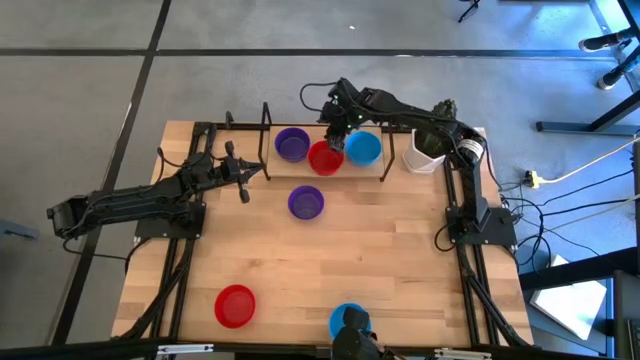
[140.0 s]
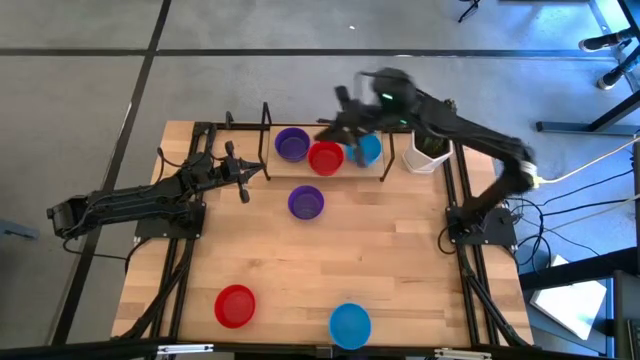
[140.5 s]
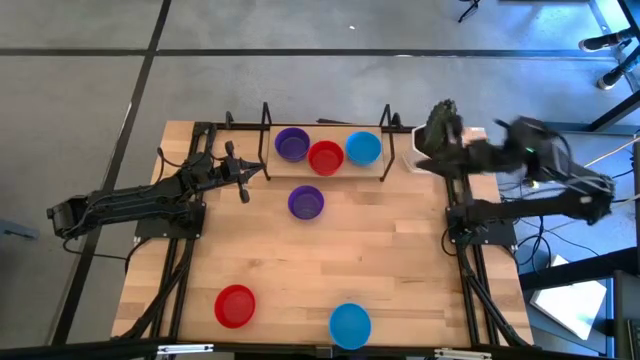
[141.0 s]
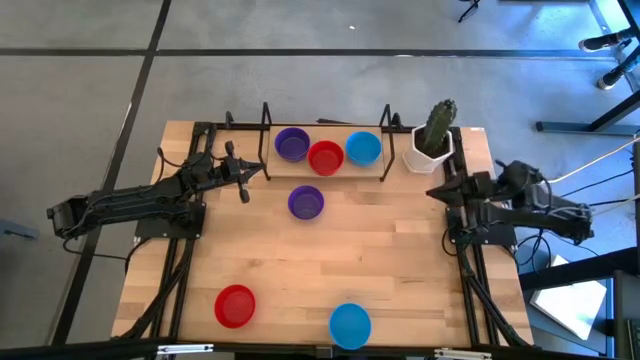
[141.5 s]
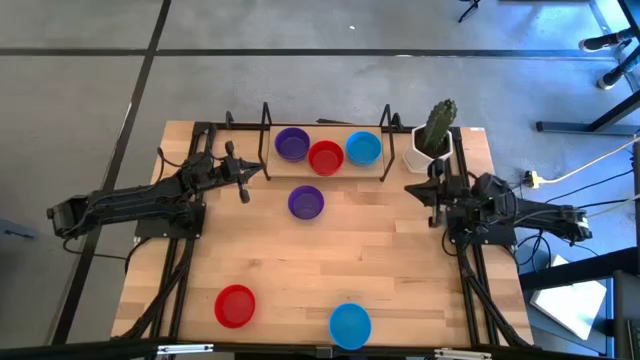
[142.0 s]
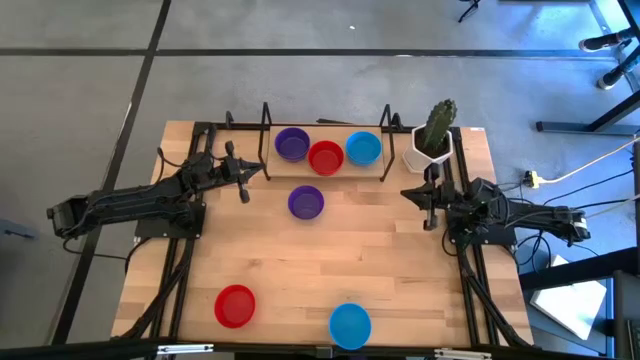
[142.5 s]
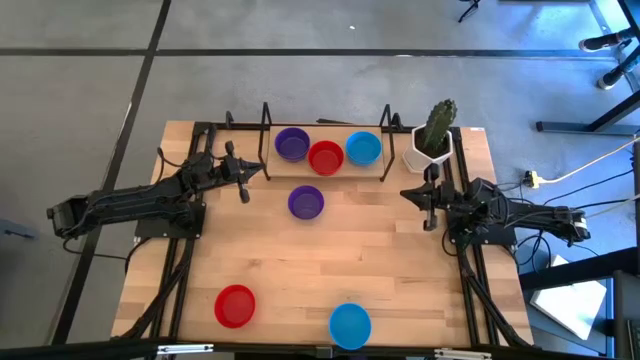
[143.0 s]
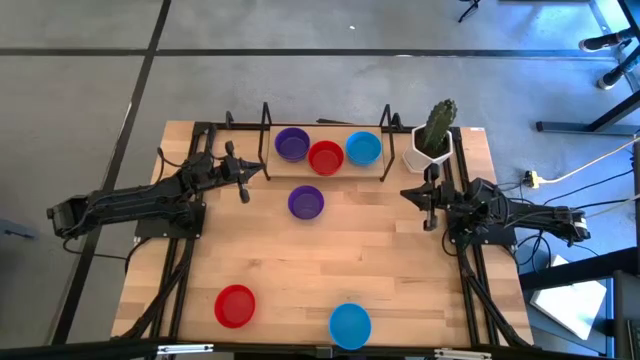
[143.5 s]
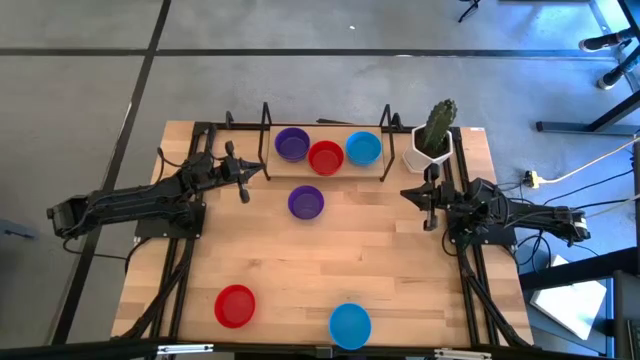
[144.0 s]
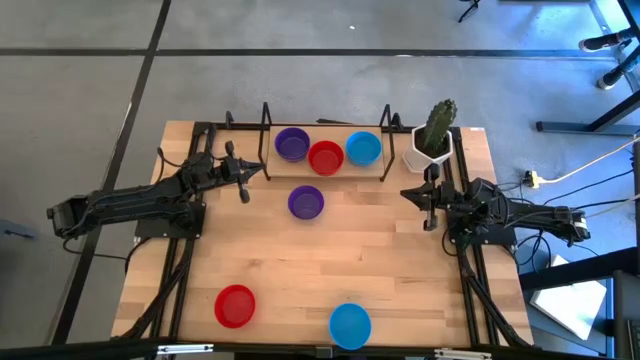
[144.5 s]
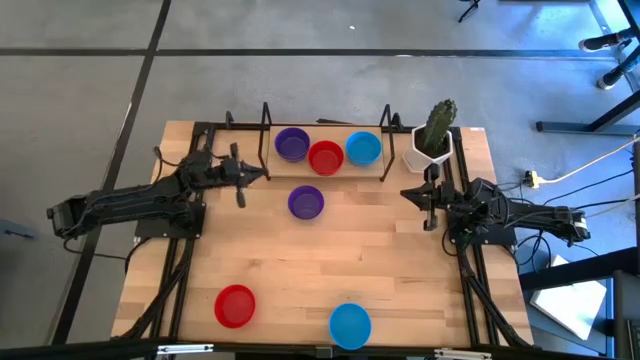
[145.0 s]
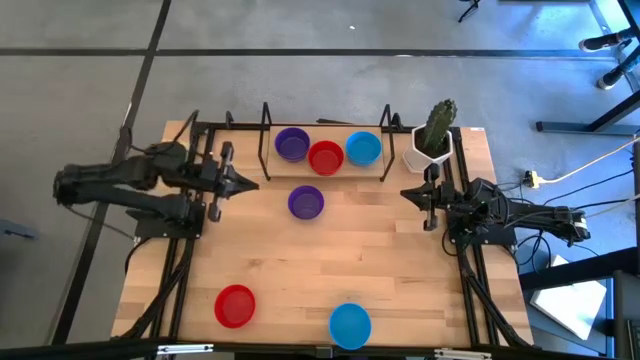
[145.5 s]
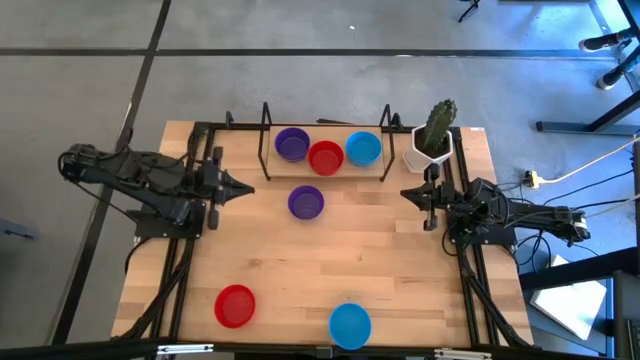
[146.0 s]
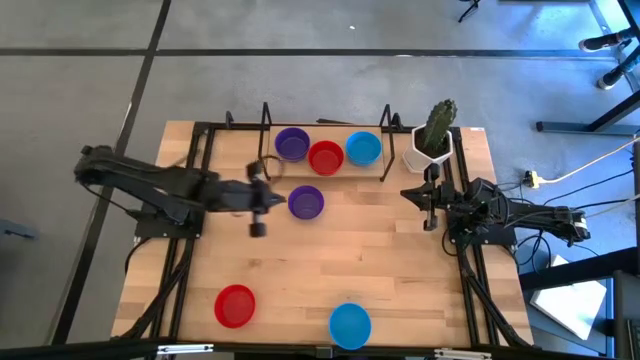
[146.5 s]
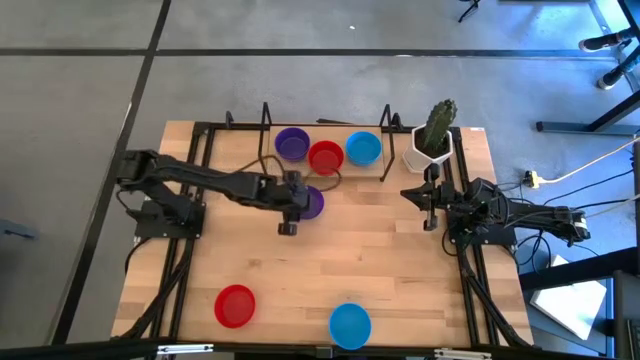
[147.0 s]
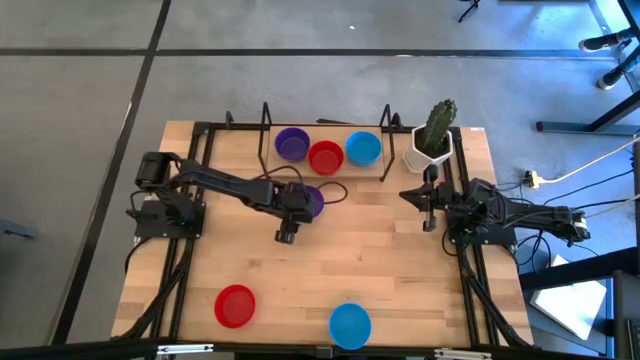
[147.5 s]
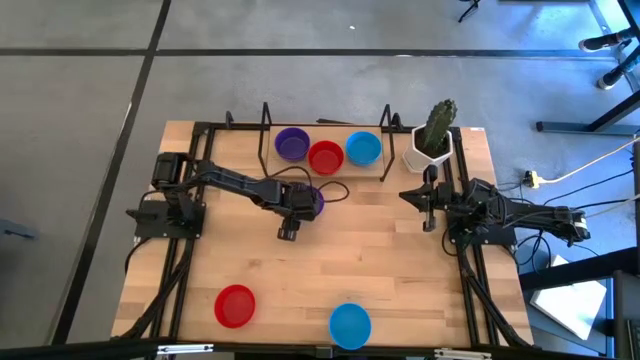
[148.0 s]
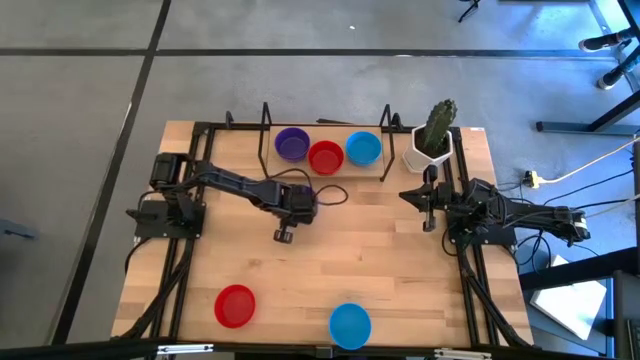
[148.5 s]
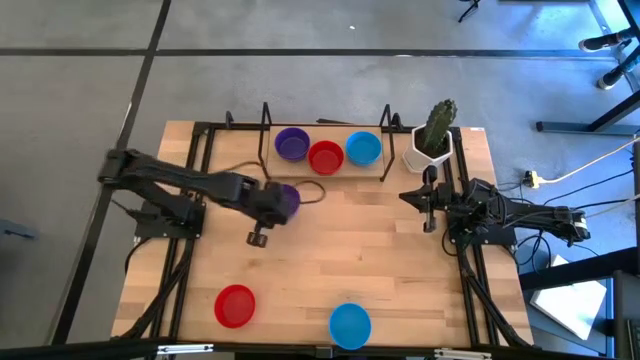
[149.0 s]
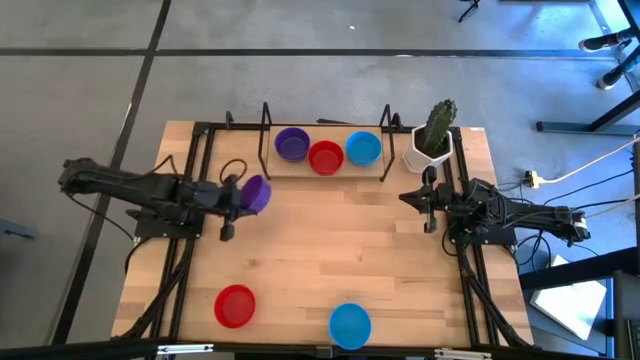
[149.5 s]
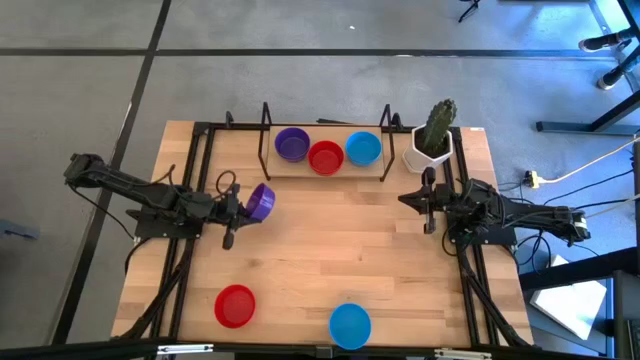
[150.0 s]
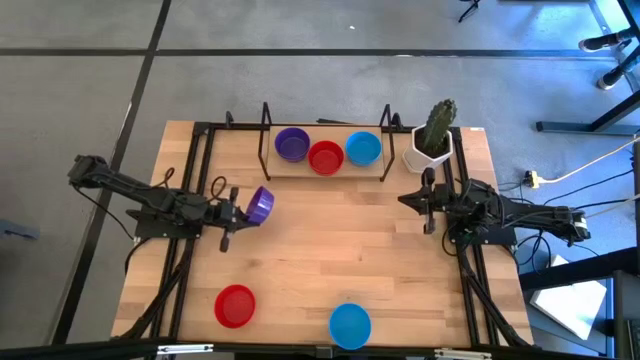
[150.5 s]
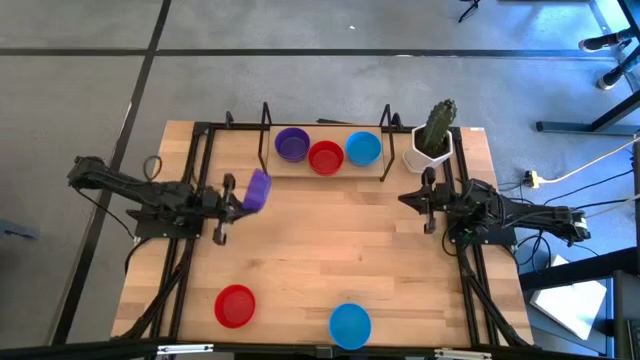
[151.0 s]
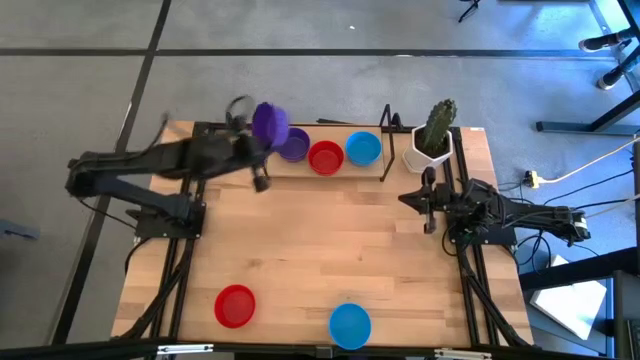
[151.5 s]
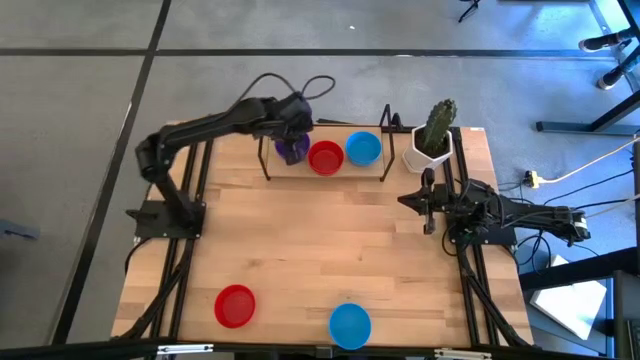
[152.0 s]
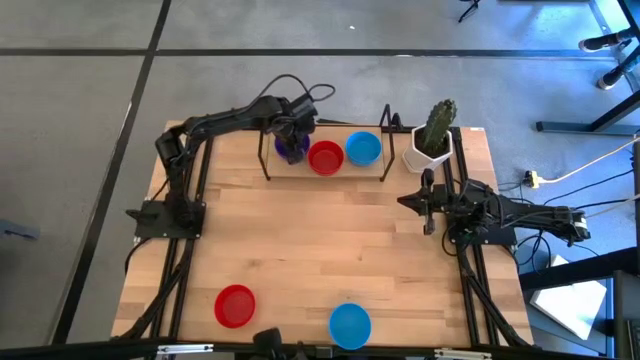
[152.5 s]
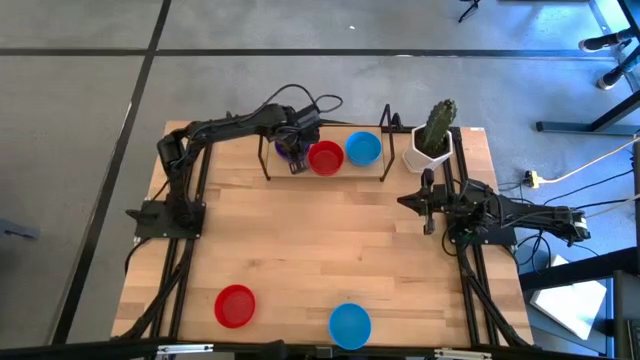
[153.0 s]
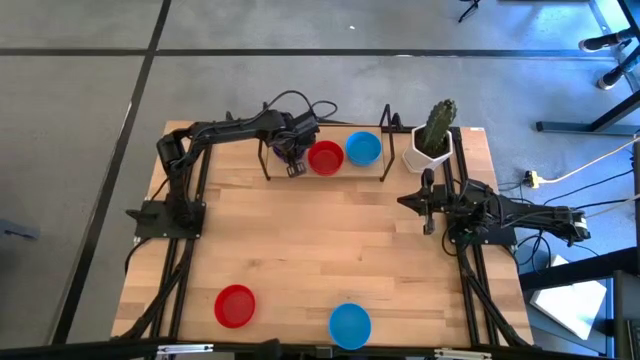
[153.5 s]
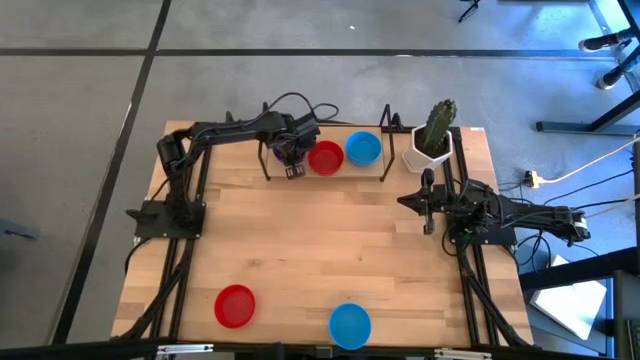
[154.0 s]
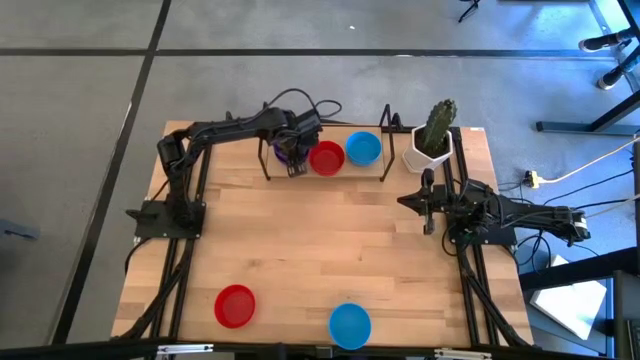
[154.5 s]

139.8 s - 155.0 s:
Task: Pick & Place Mini bowls
Stack the violet bowl on top of the violet bowl on the shelf

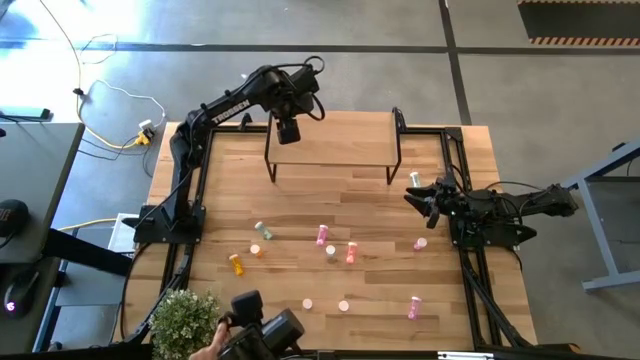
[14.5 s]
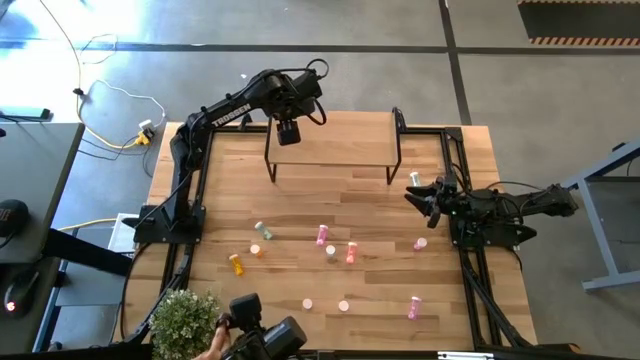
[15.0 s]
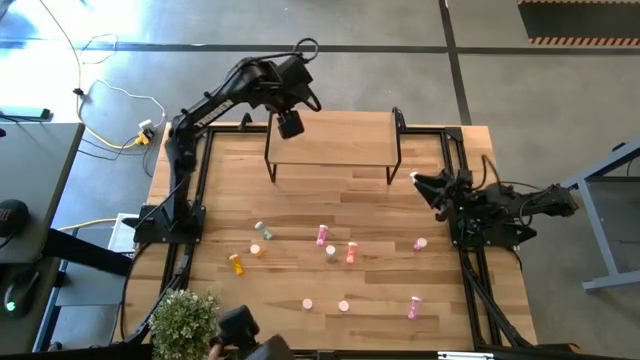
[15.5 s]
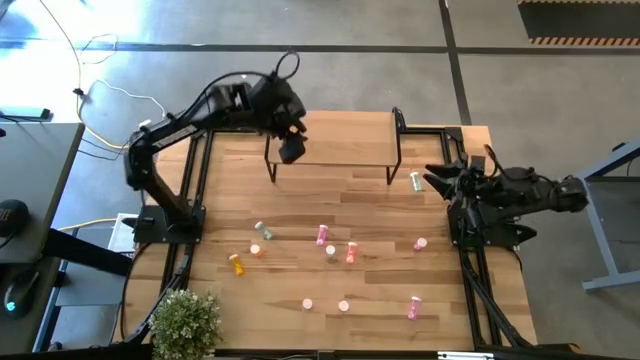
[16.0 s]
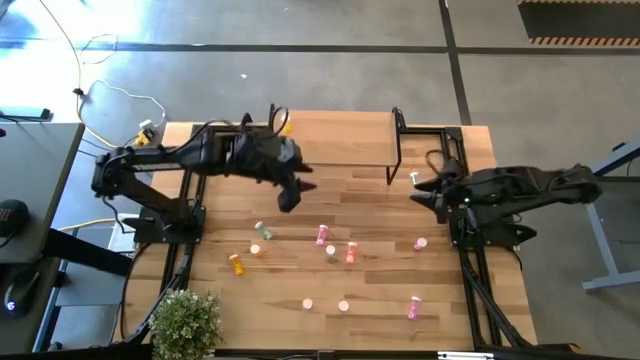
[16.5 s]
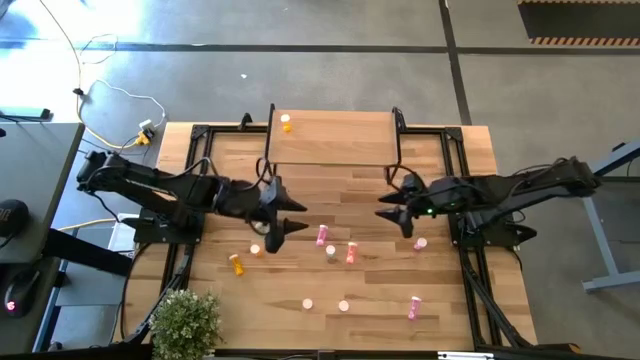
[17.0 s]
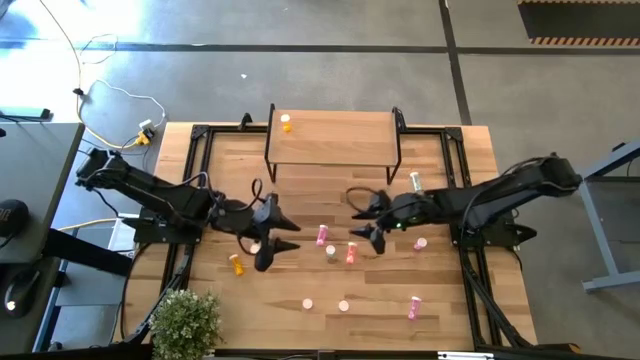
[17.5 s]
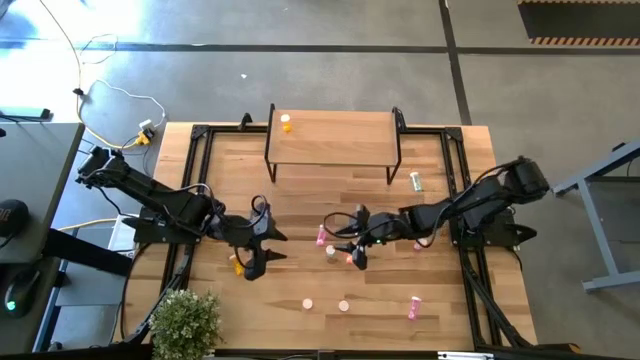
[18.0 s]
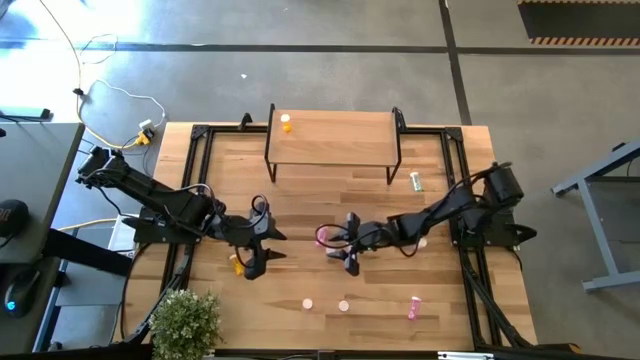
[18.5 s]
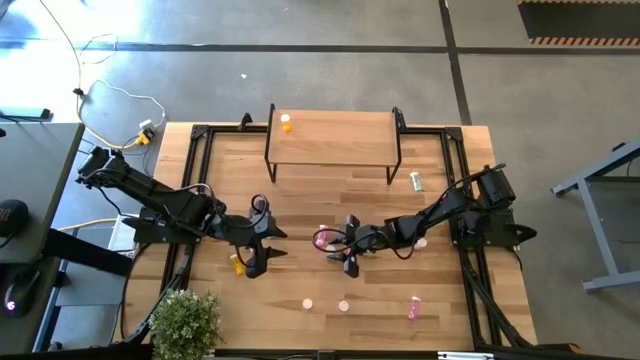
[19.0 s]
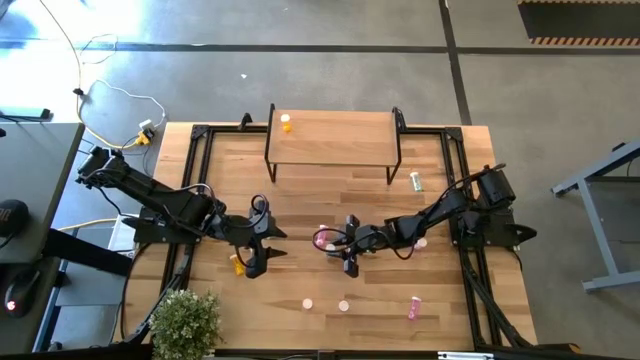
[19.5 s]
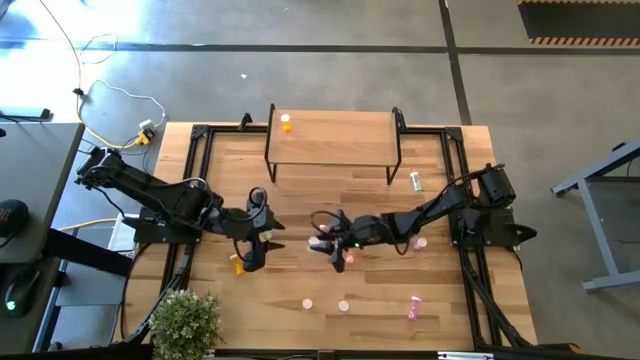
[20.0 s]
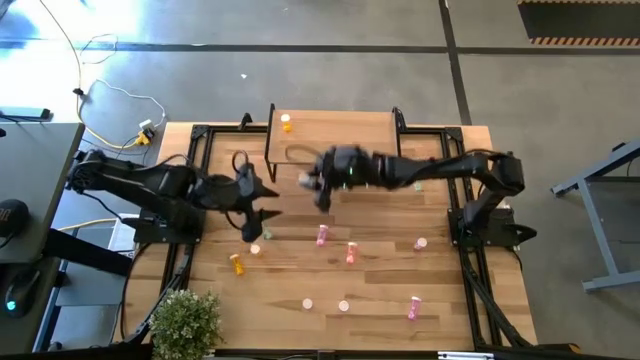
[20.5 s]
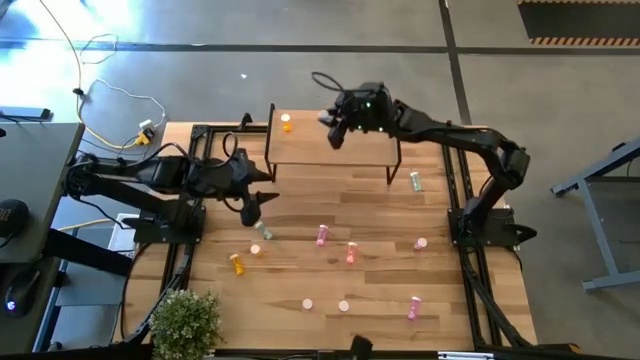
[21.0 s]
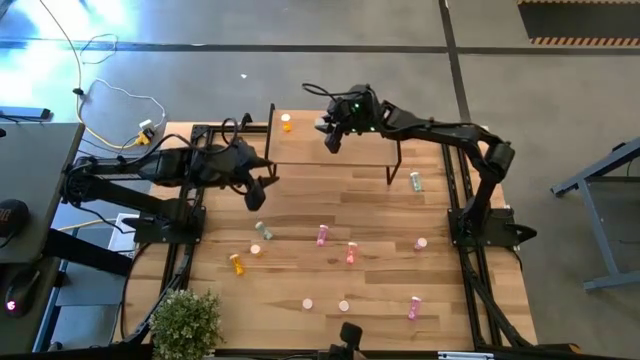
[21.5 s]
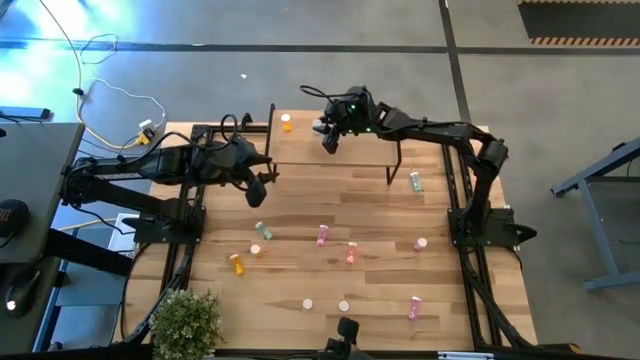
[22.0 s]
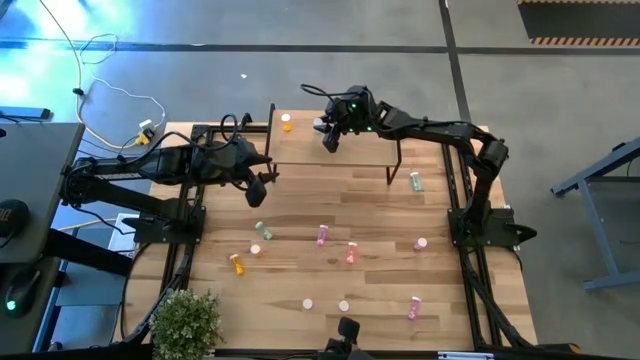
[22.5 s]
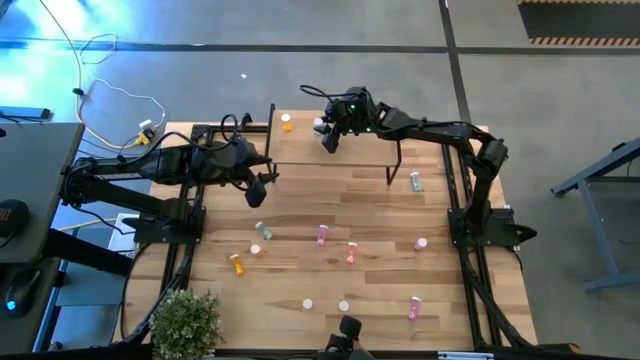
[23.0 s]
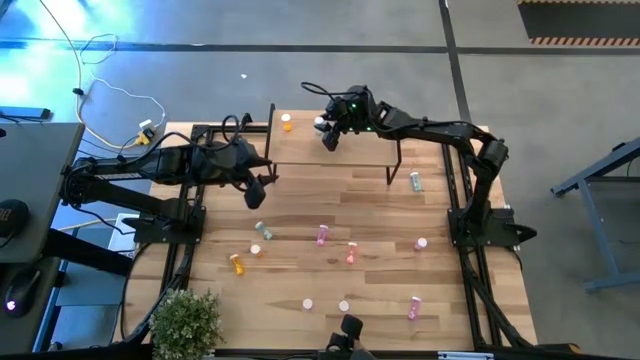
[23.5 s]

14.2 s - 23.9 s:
Task: Pick and place medicine bottles onto shelf by color
Put the center green pill bottle on the shelf
